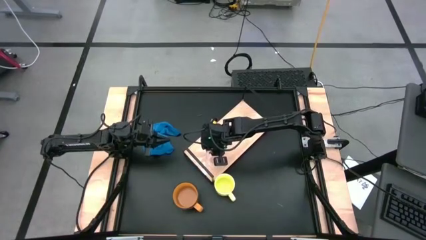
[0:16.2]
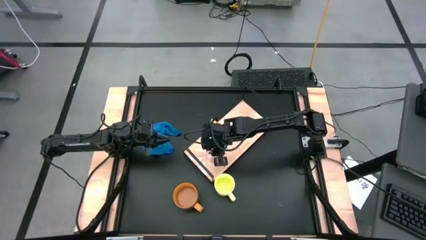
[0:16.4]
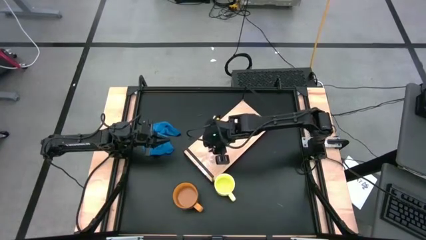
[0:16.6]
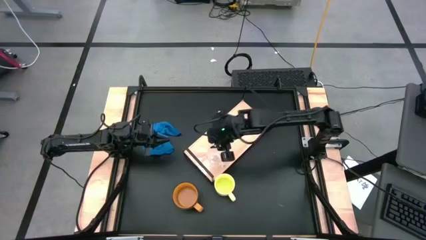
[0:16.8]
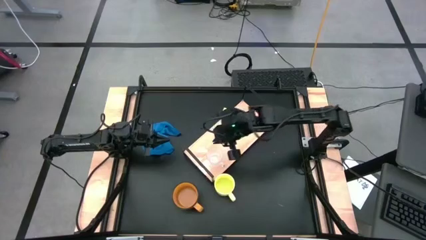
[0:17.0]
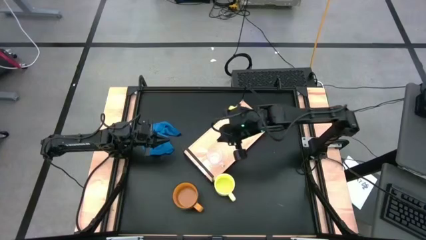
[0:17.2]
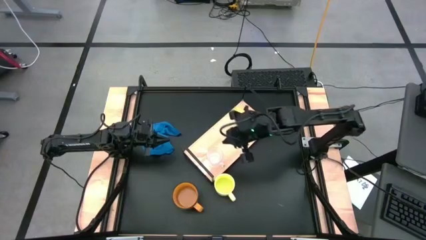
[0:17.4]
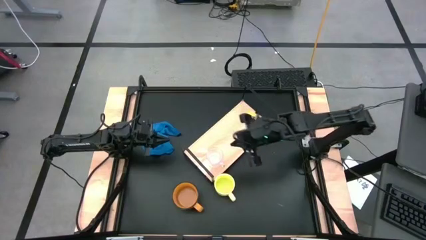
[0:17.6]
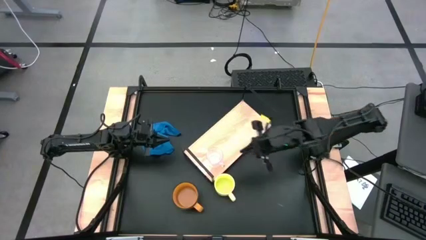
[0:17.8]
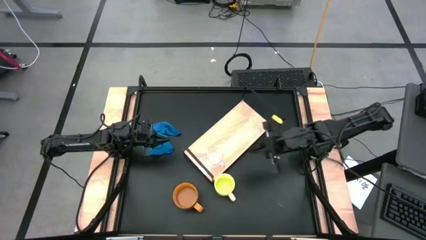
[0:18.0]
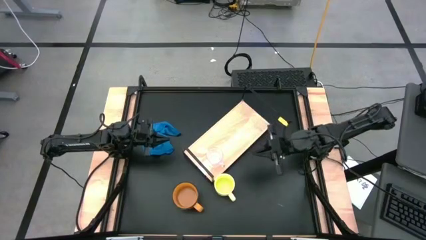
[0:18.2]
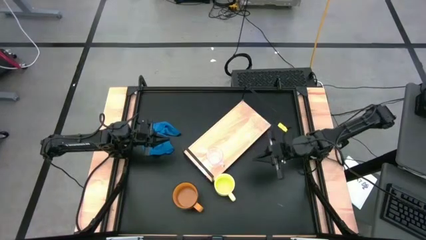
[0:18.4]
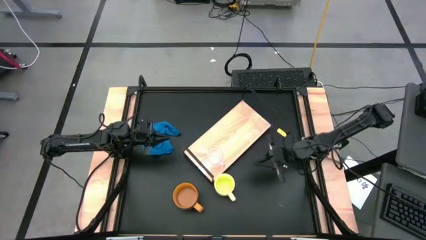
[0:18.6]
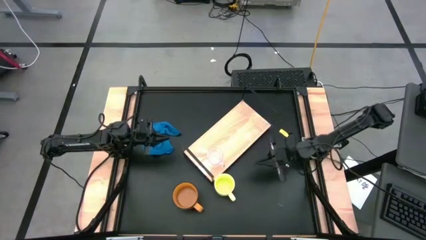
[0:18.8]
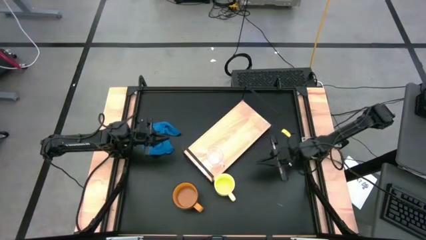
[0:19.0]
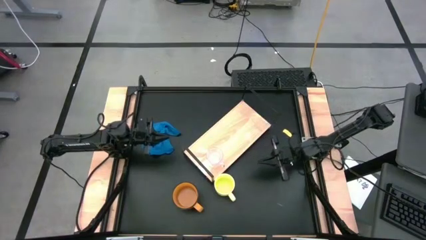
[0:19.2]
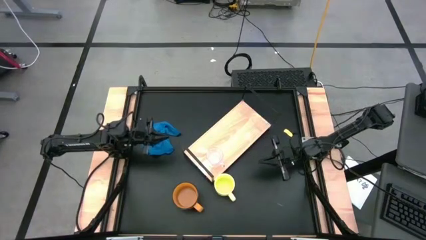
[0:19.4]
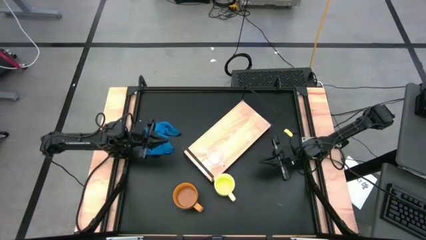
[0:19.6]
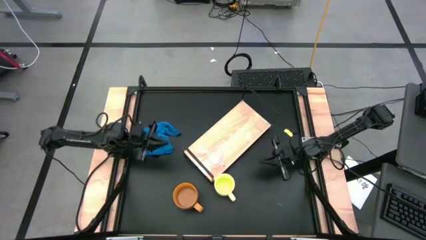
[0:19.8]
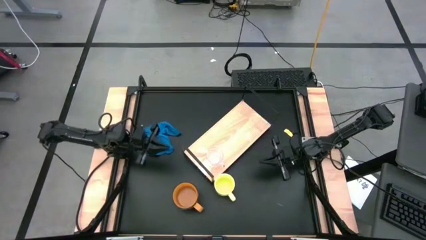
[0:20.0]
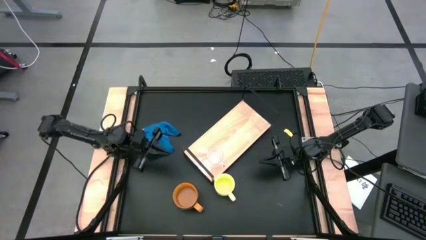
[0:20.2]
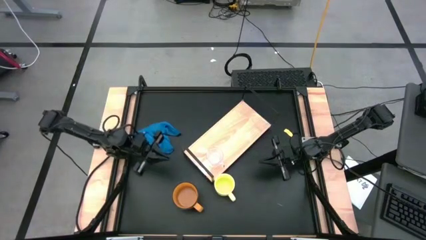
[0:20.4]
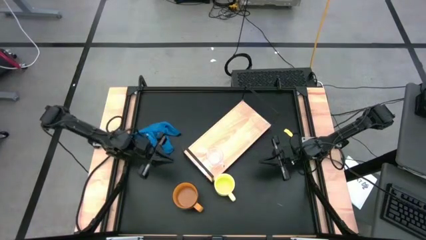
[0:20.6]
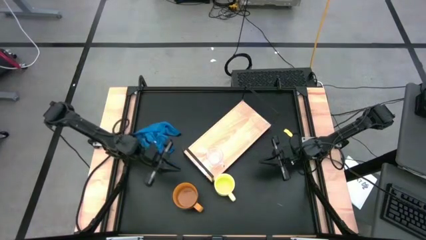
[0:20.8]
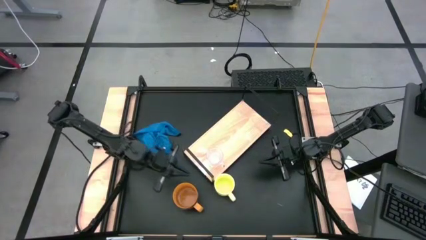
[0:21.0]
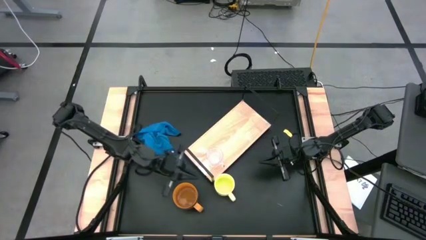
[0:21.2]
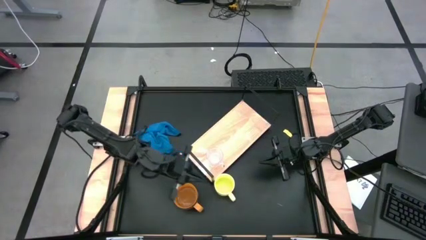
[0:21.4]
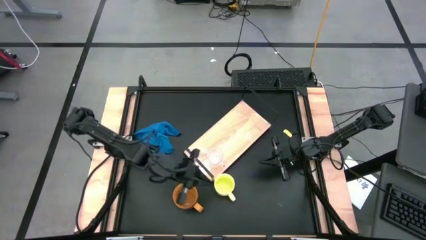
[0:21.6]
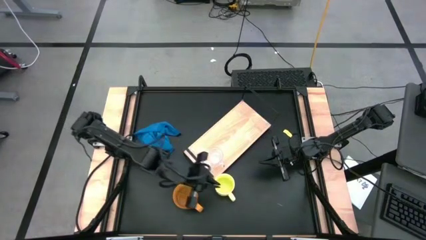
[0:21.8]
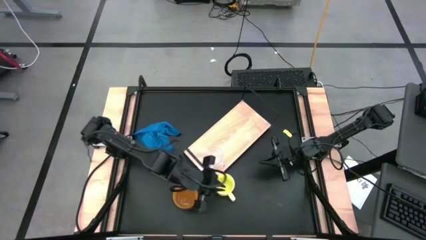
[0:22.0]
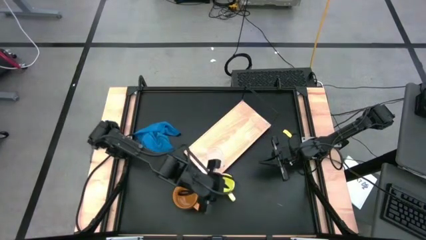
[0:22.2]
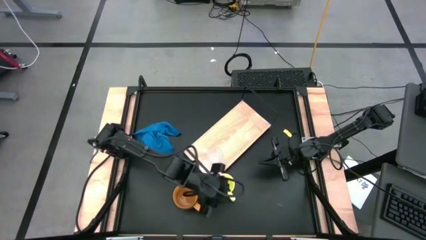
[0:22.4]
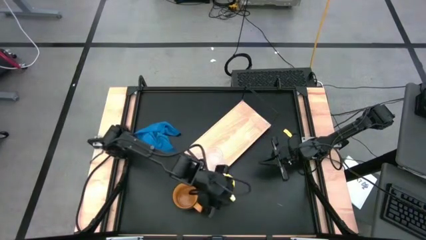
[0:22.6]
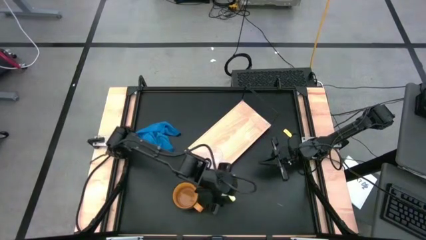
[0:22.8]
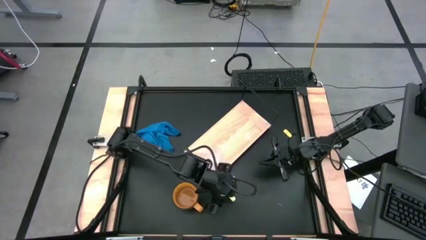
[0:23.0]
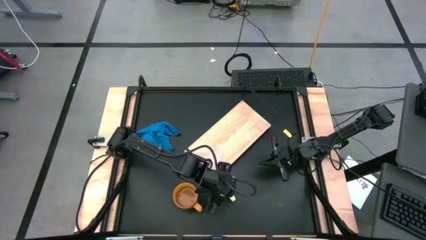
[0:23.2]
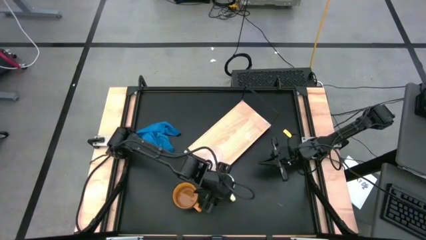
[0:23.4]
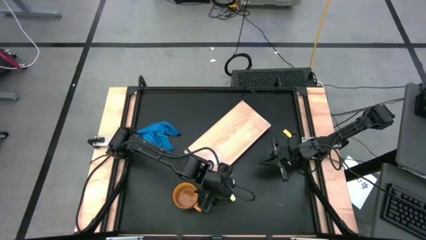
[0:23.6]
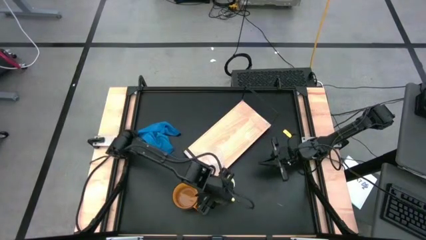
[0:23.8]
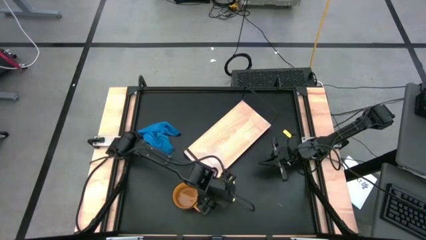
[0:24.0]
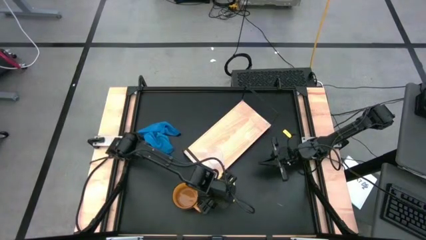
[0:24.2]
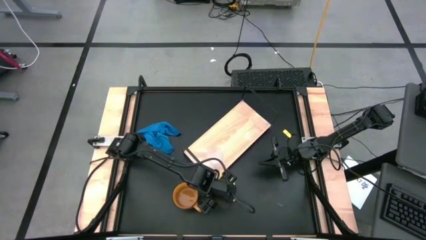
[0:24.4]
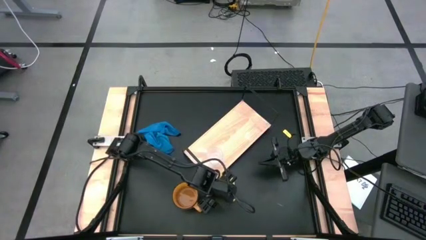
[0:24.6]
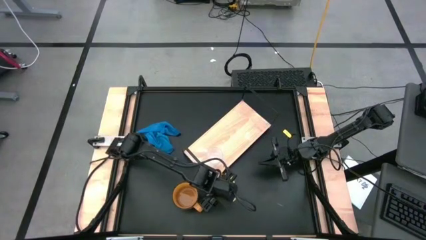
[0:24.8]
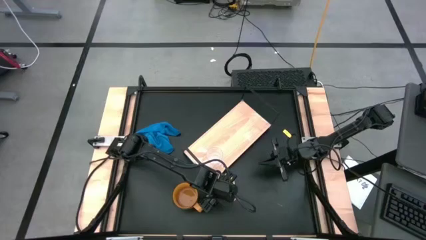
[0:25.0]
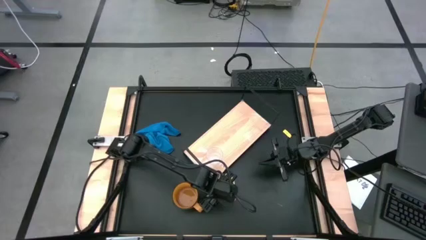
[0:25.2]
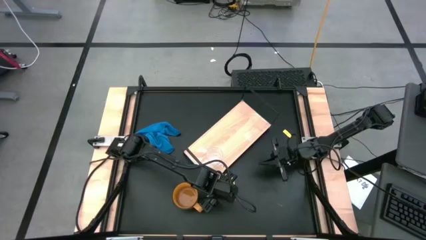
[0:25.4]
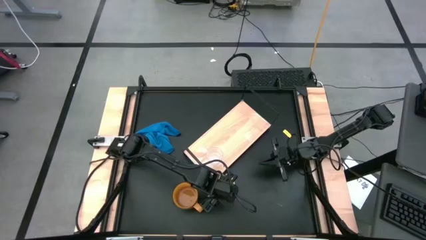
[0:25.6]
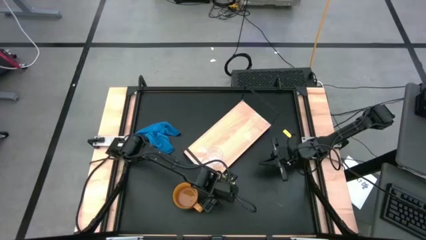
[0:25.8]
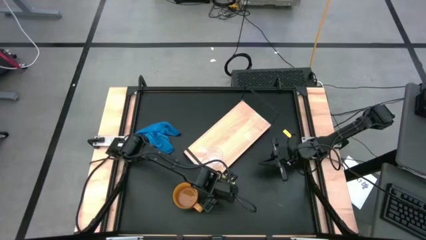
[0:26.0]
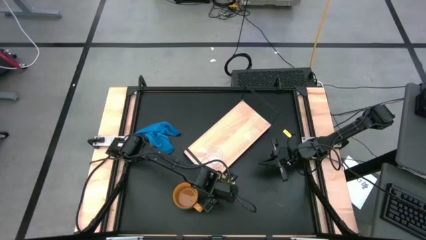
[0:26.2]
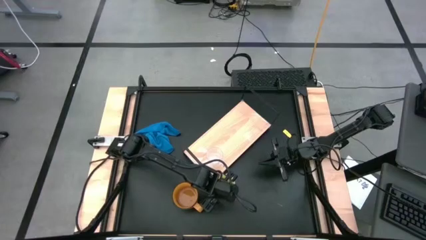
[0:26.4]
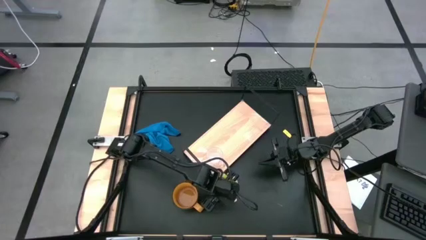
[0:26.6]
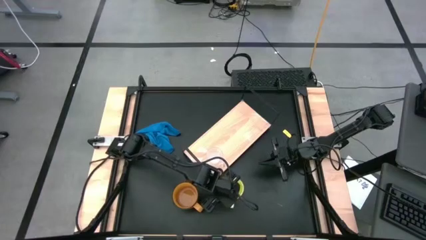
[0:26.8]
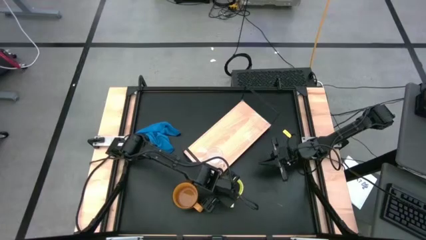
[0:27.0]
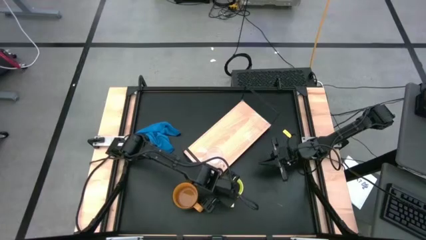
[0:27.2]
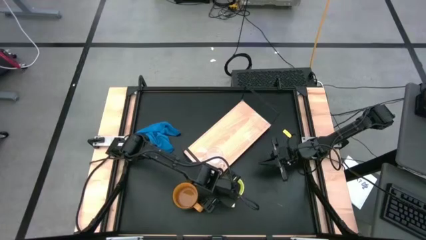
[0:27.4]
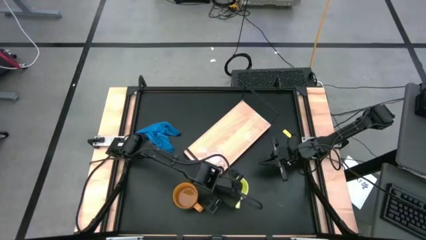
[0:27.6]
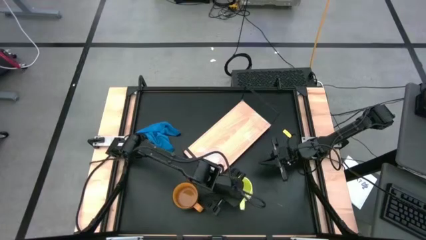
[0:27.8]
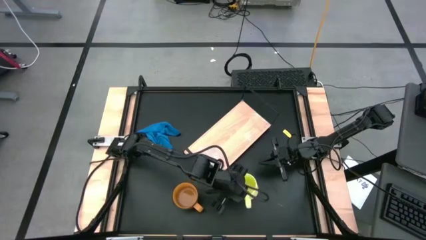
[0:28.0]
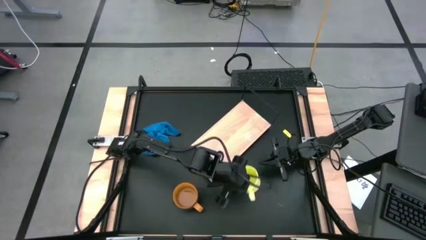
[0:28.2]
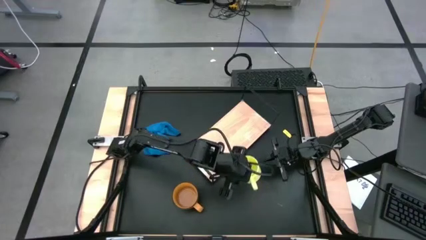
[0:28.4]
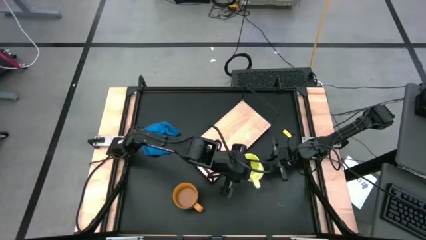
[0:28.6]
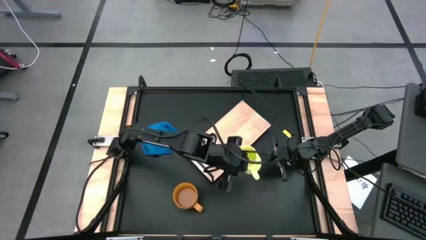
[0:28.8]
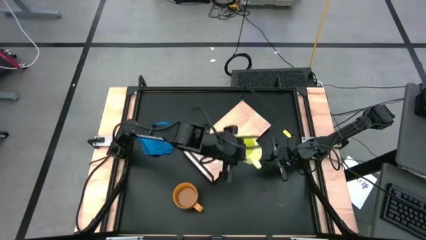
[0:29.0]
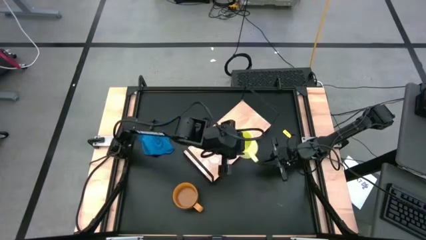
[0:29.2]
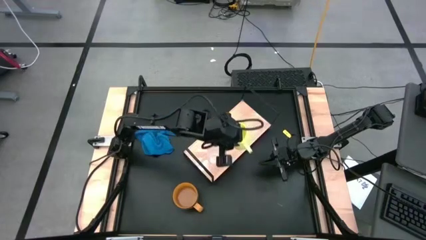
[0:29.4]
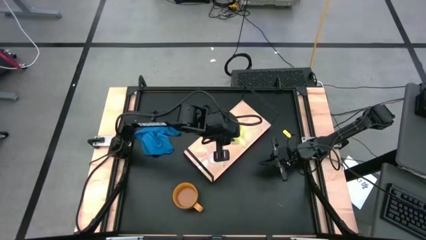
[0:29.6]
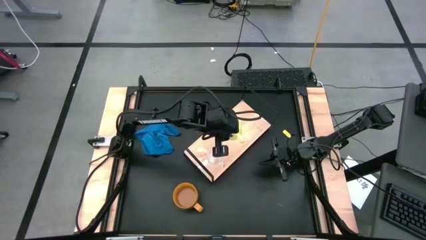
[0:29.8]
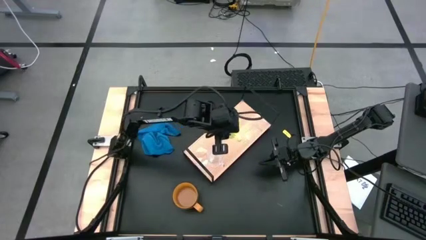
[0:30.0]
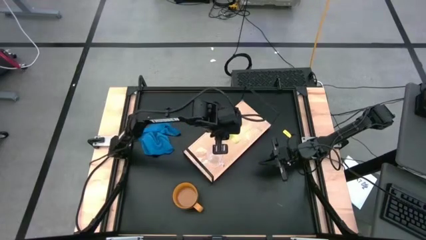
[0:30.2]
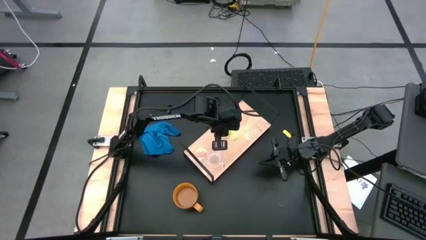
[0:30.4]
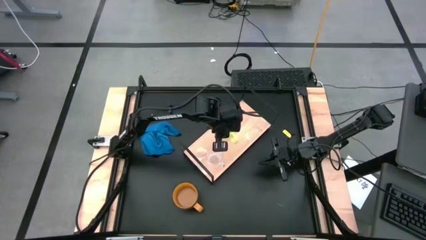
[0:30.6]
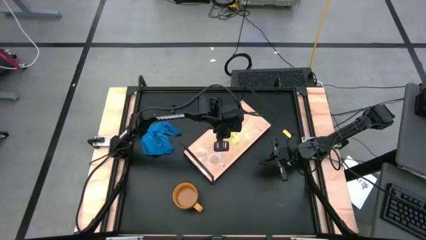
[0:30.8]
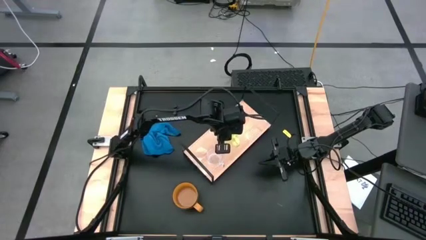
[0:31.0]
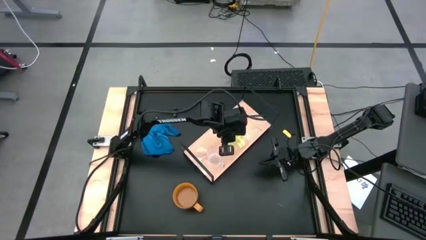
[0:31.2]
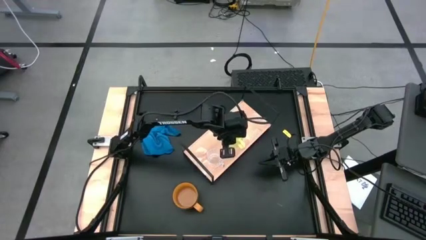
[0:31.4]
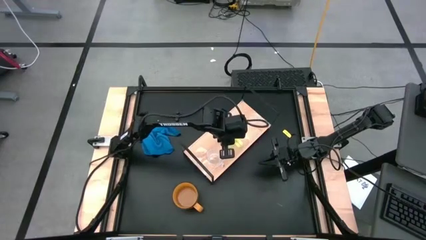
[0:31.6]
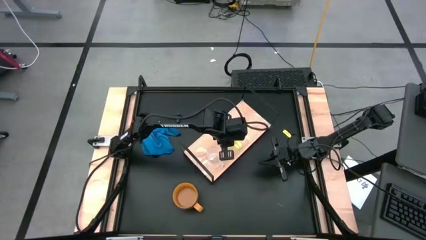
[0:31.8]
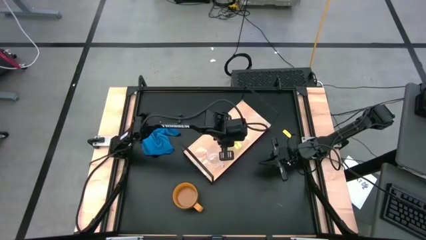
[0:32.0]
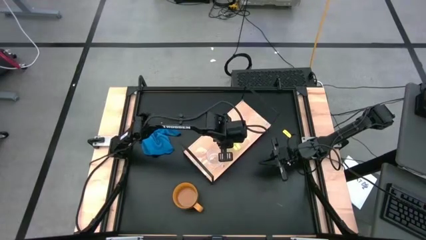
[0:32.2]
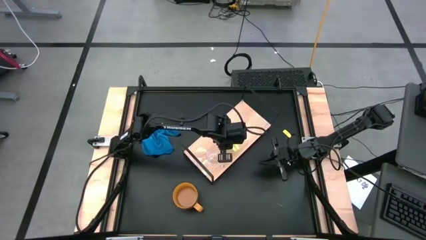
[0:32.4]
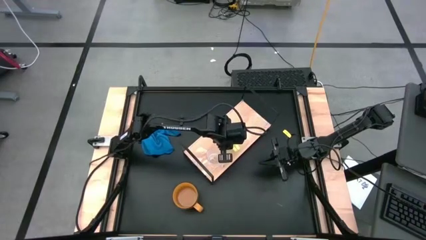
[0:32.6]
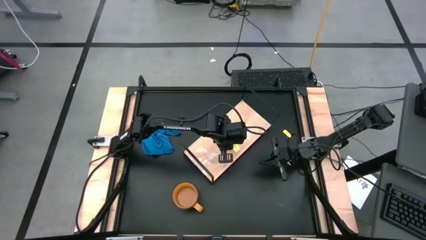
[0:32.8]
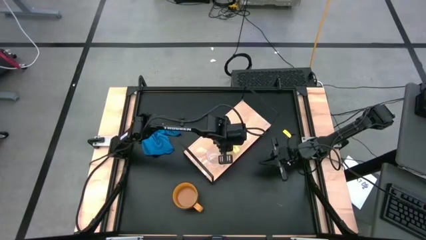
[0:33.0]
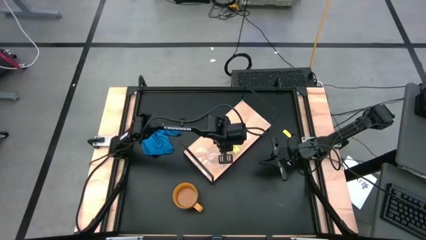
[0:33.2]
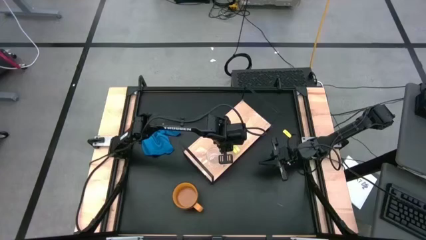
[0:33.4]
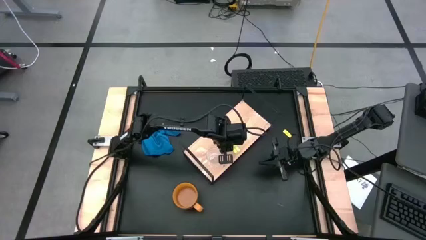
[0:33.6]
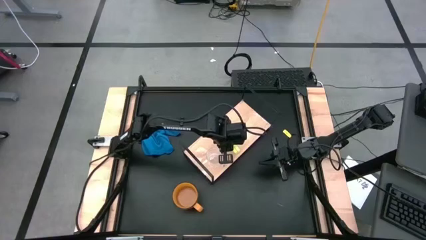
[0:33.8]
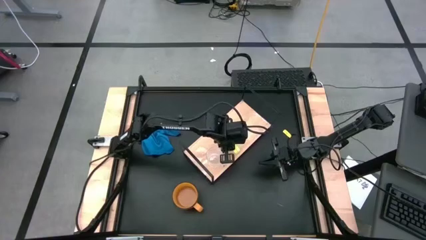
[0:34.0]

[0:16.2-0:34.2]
Task: Stack small to large cups/mugs on shelf
Put the yellow mug on the shelf
